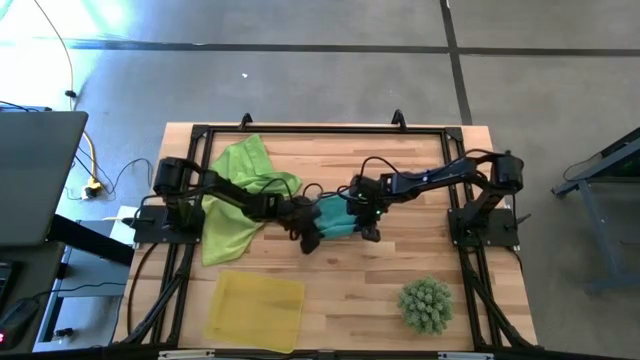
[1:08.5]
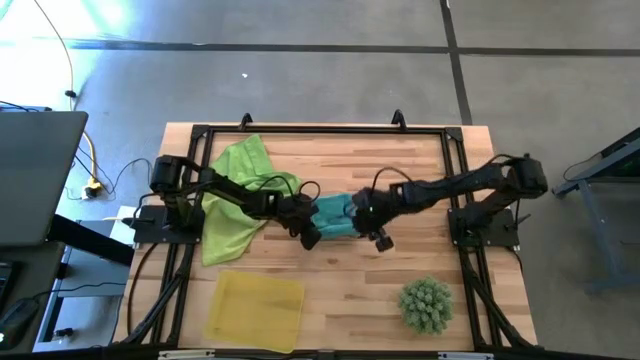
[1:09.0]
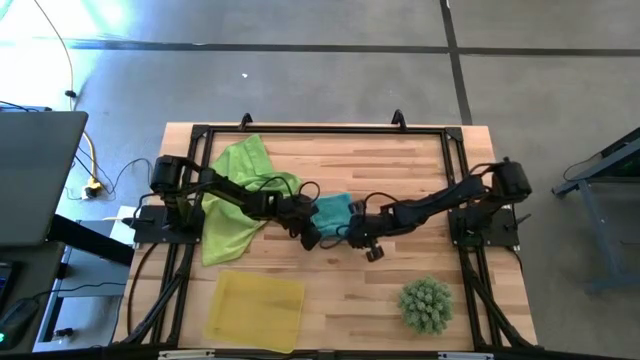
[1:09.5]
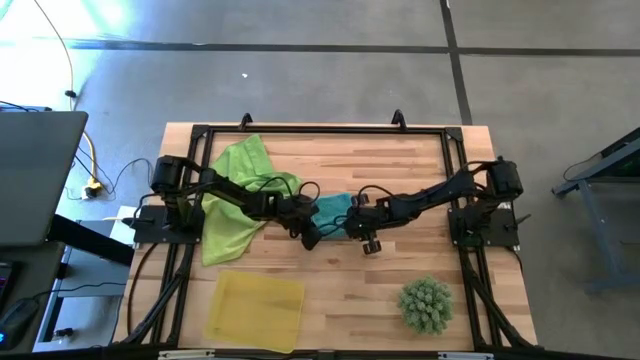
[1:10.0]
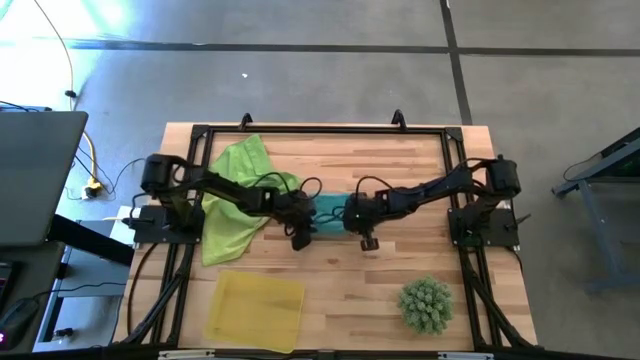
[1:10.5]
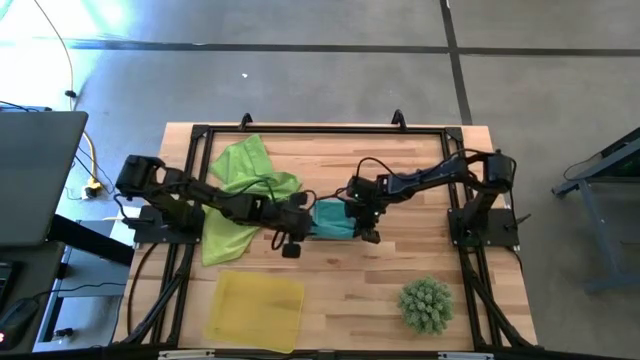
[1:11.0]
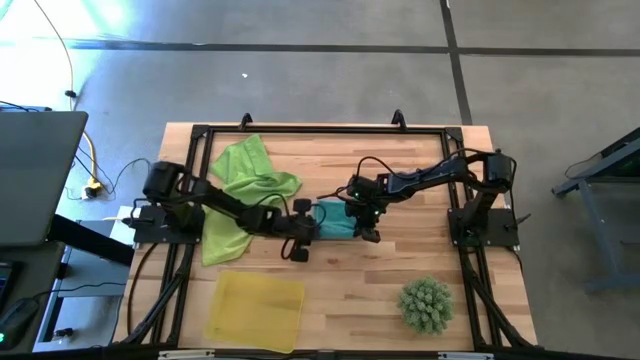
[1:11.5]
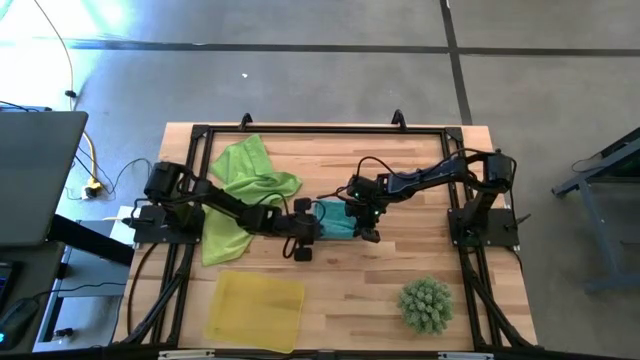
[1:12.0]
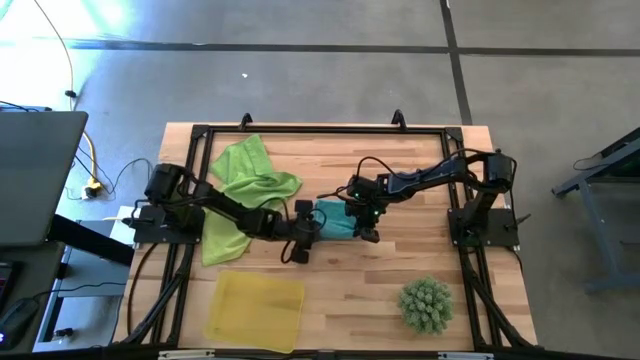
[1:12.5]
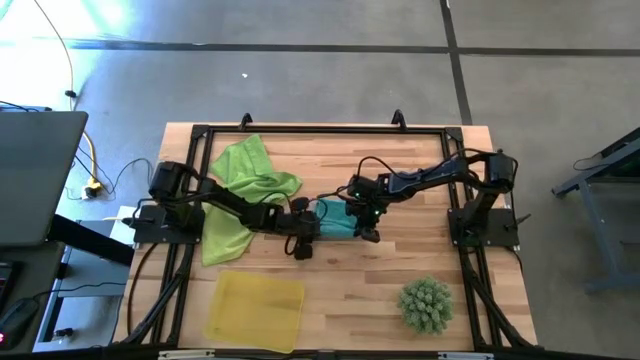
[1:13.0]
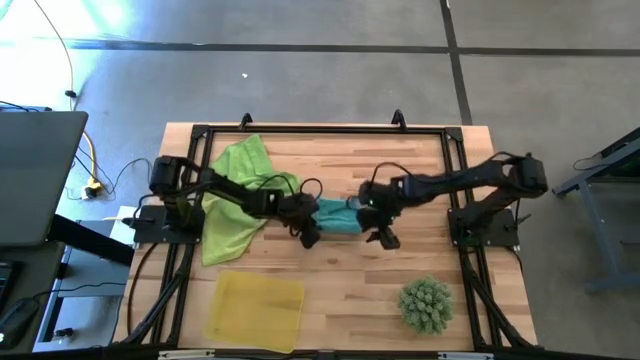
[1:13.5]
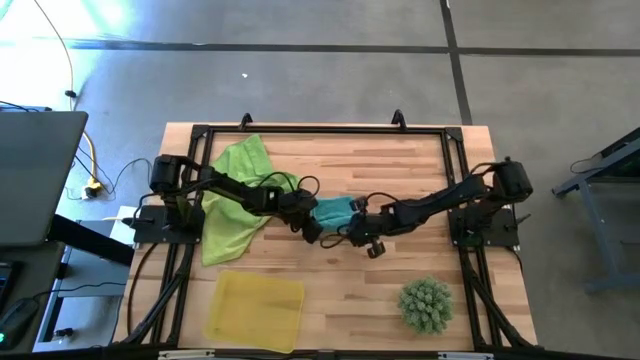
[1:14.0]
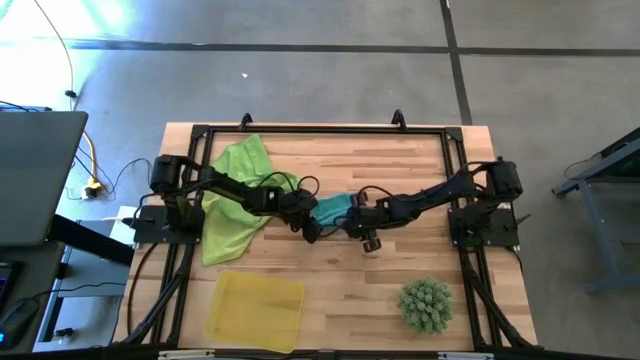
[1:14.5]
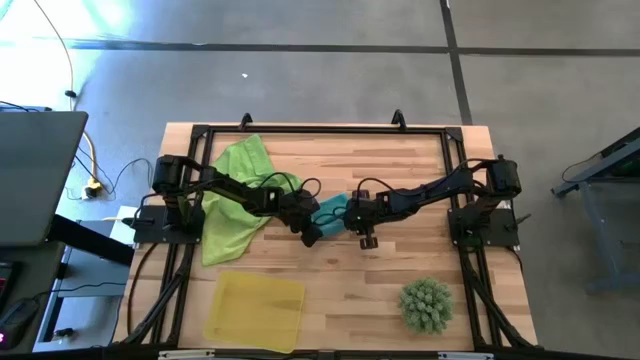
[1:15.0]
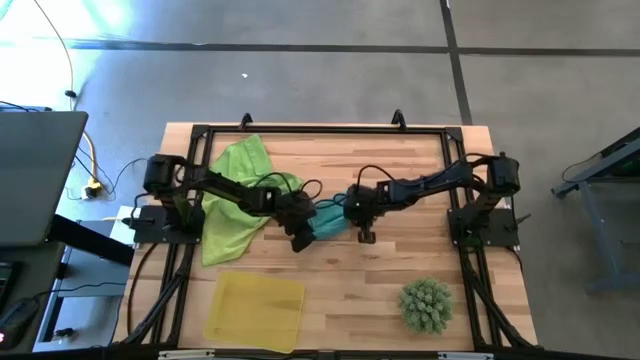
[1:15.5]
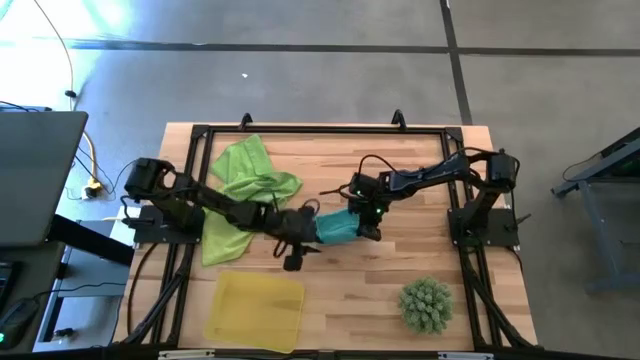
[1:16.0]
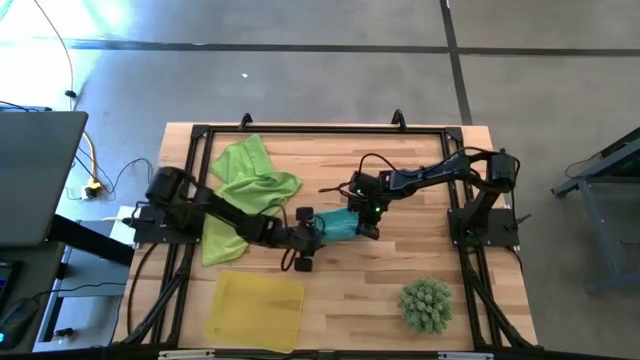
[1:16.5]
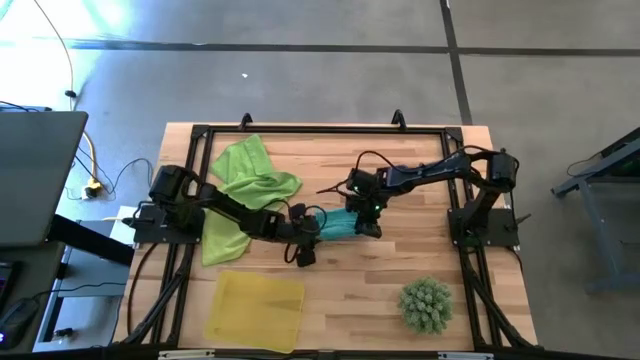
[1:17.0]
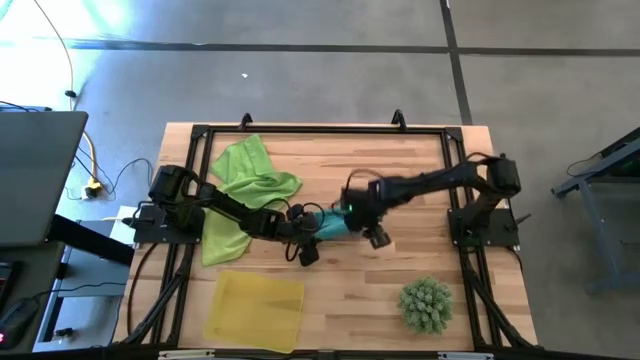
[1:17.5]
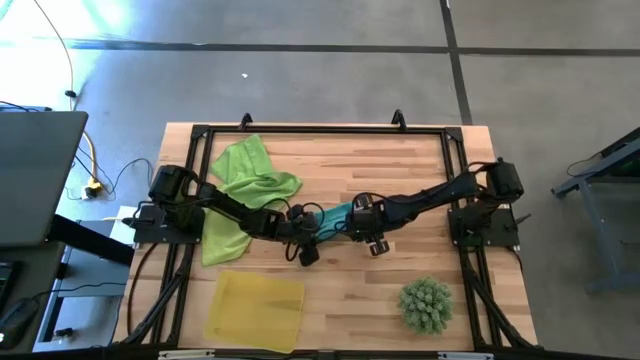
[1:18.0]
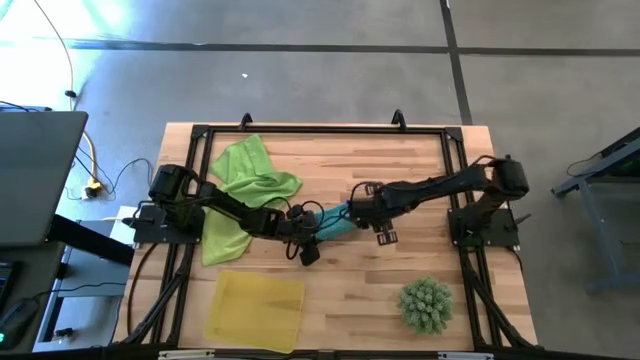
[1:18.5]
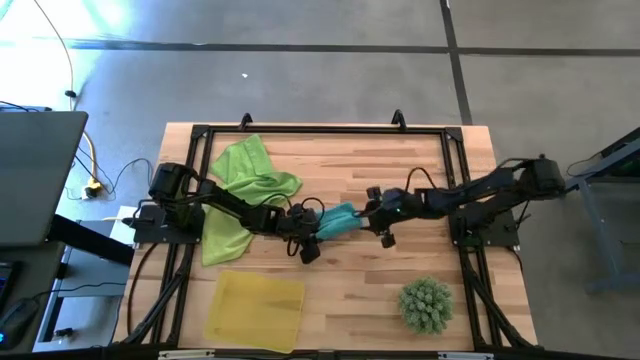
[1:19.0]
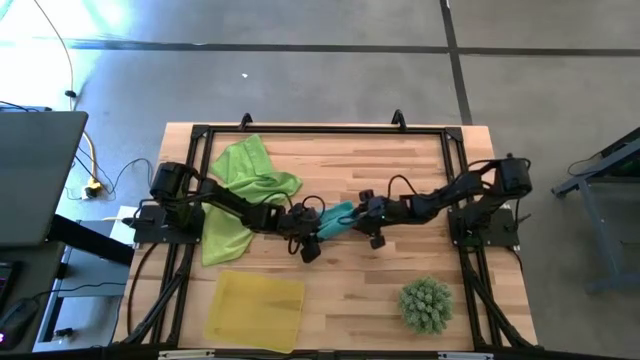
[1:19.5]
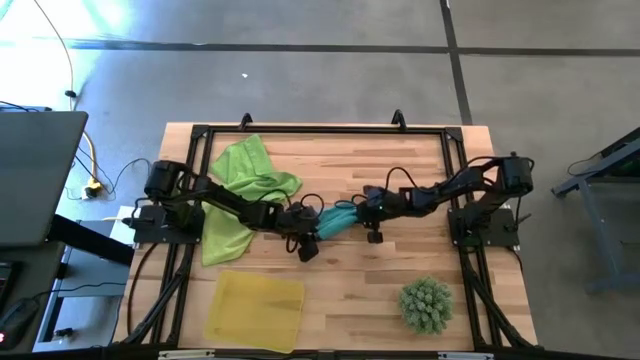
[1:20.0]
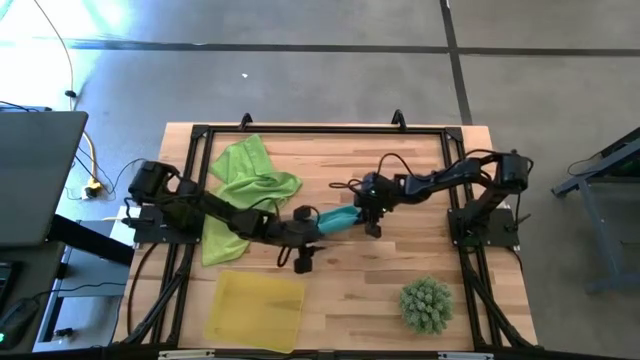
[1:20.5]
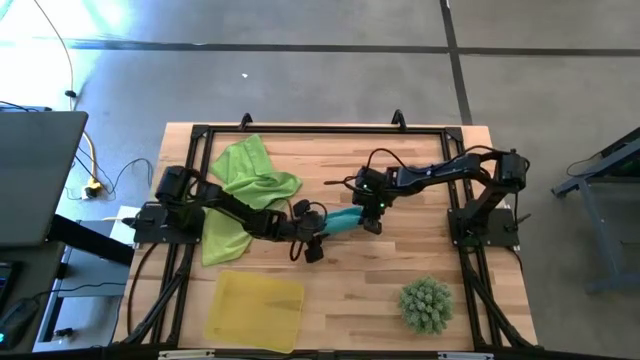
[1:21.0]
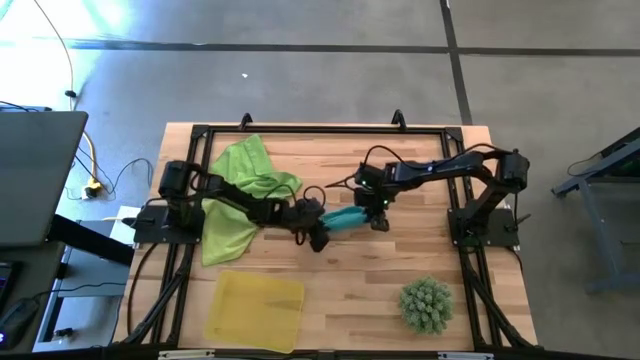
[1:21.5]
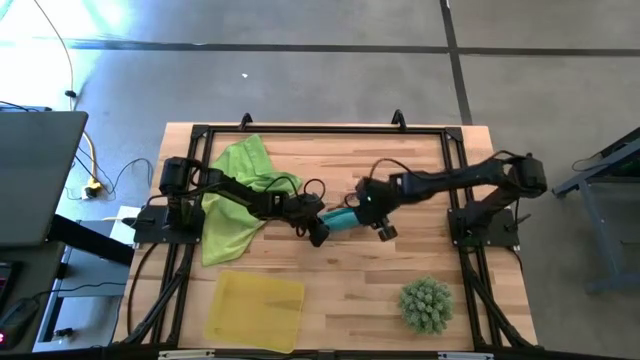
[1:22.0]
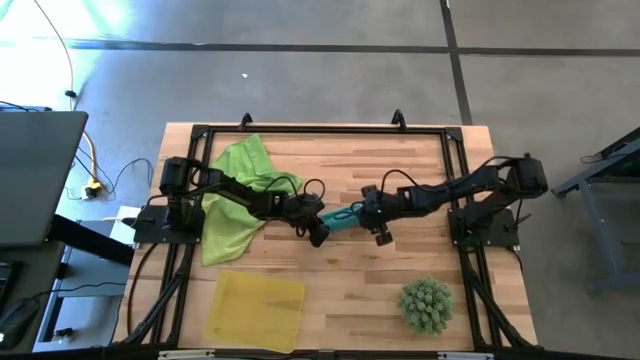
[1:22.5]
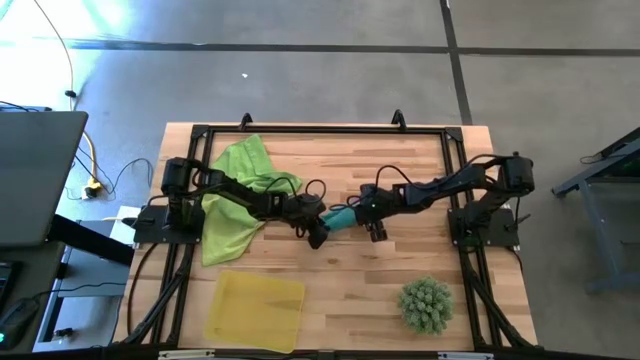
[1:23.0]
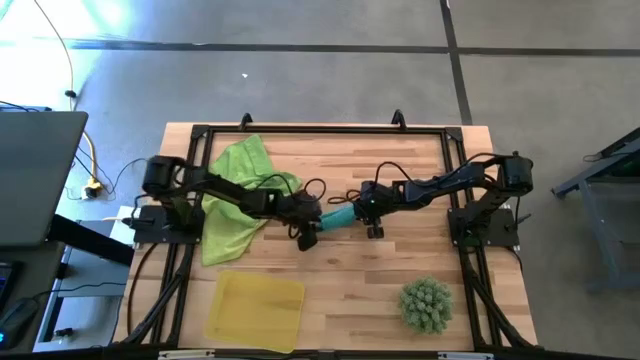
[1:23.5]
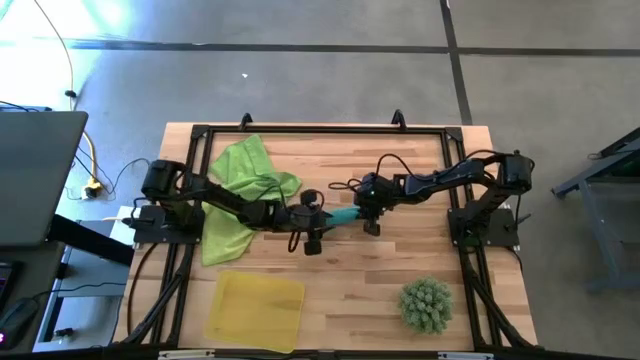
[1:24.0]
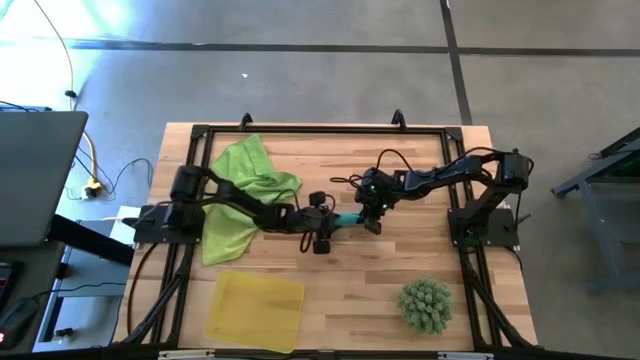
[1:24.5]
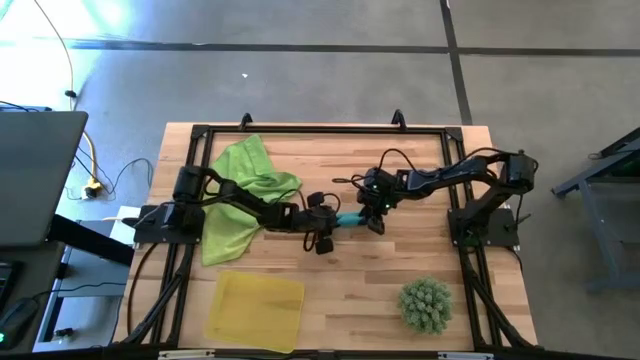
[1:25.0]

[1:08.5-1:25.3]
Task: Roll microfiber towels into tight, uniform cylinder then place into a basket
Roll the blue microfiber towel

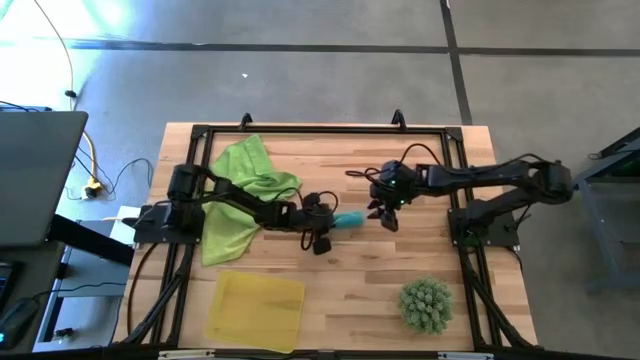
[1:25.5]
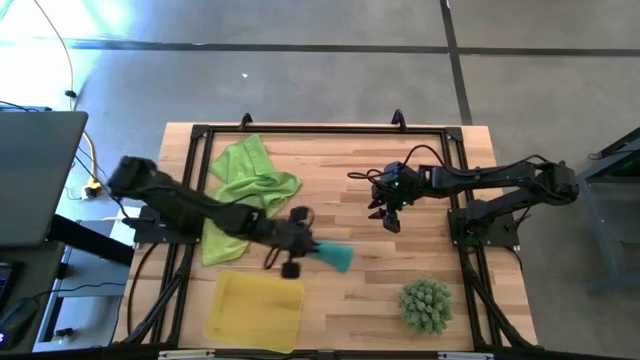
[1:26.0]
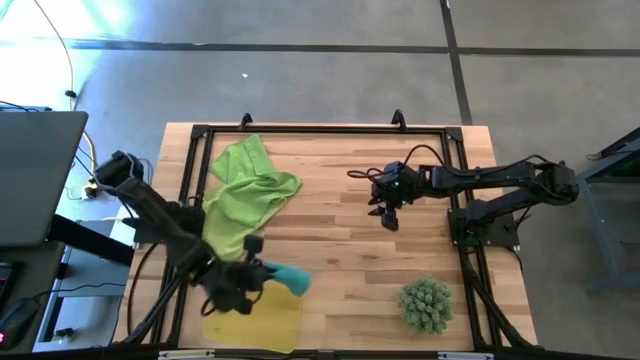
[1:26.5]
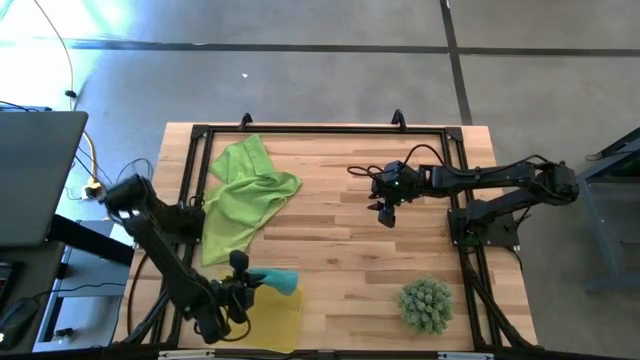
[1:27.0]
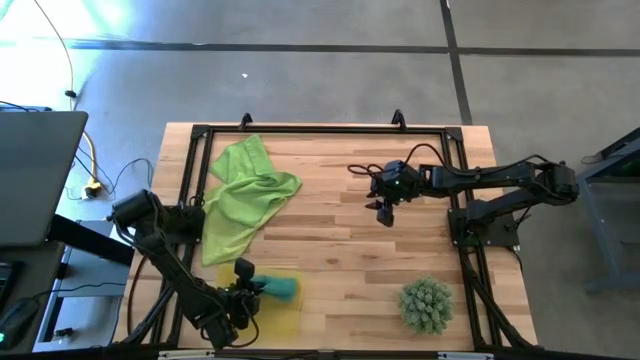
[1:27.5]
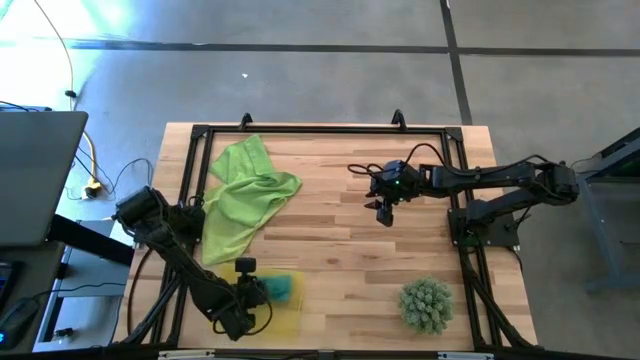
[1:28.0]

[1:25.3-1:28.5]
Put the blue microfiber towel into the yellow bin
